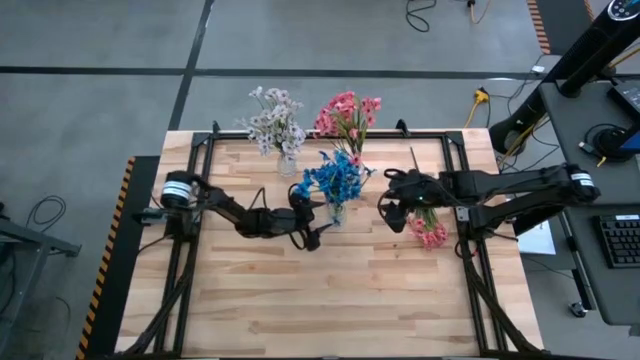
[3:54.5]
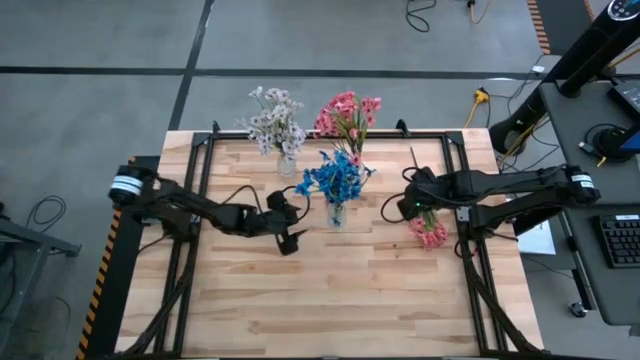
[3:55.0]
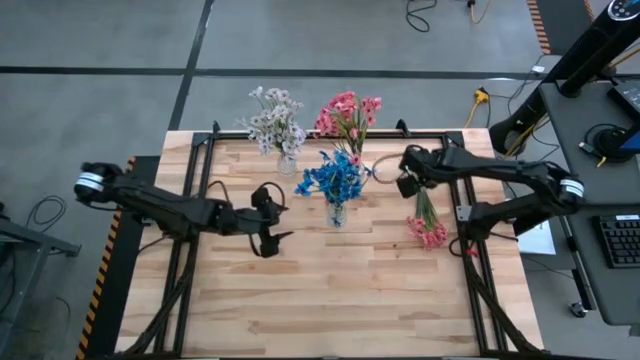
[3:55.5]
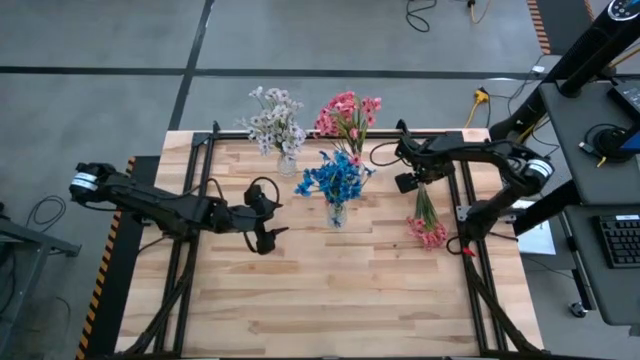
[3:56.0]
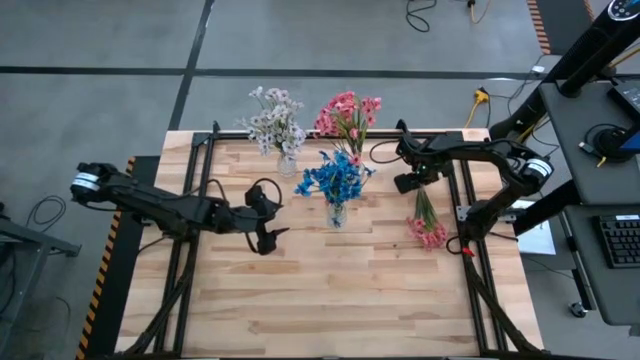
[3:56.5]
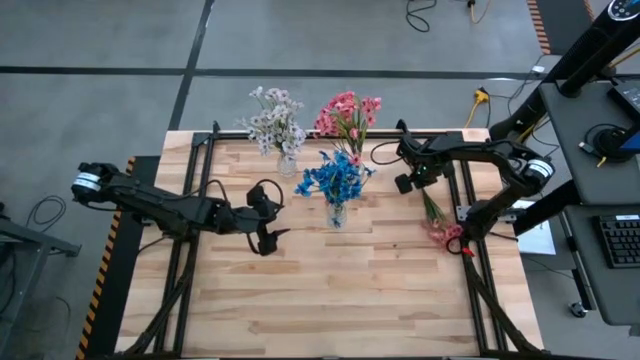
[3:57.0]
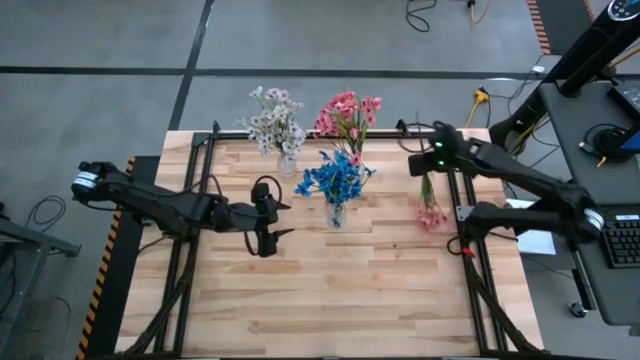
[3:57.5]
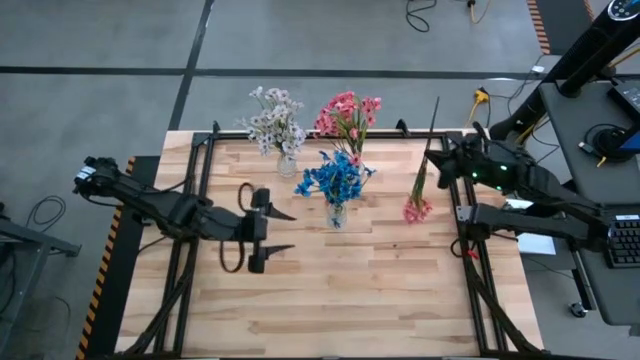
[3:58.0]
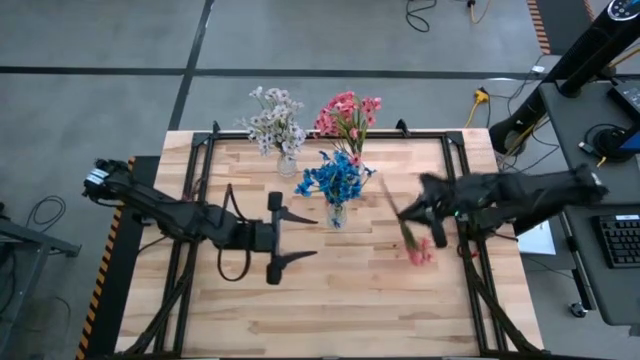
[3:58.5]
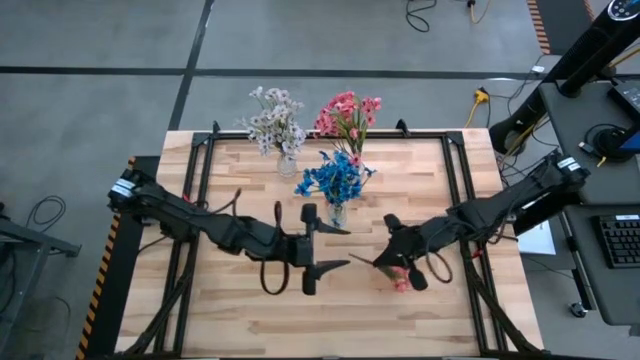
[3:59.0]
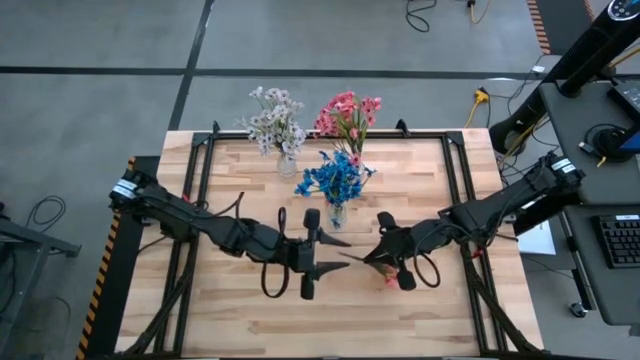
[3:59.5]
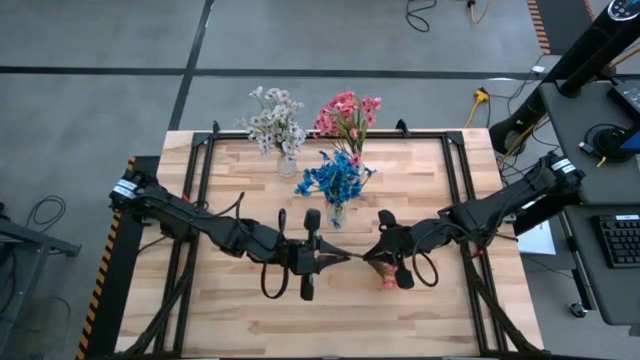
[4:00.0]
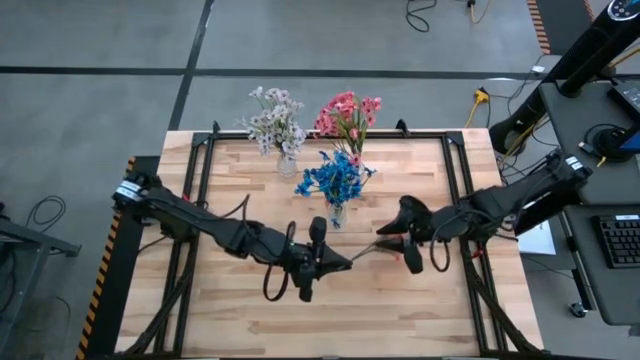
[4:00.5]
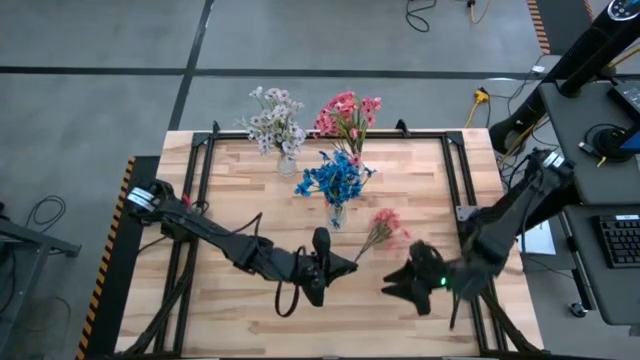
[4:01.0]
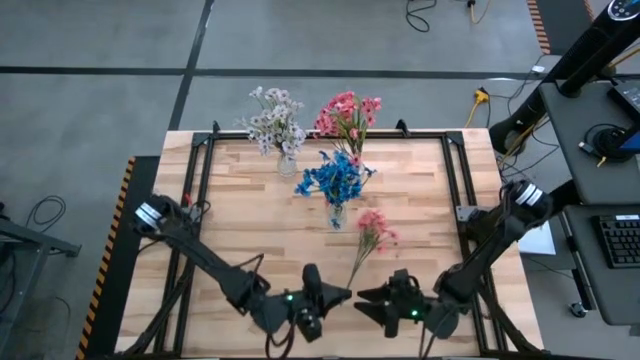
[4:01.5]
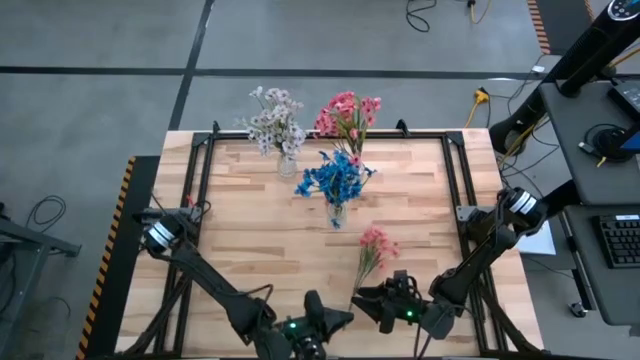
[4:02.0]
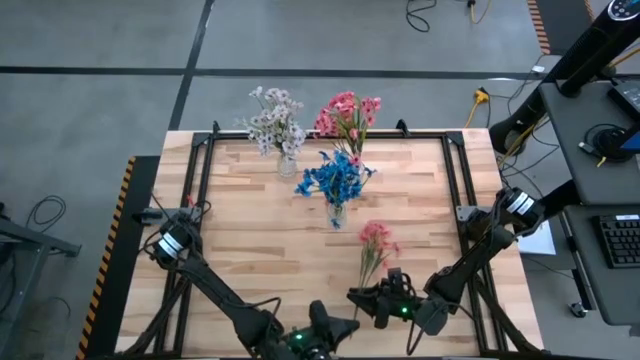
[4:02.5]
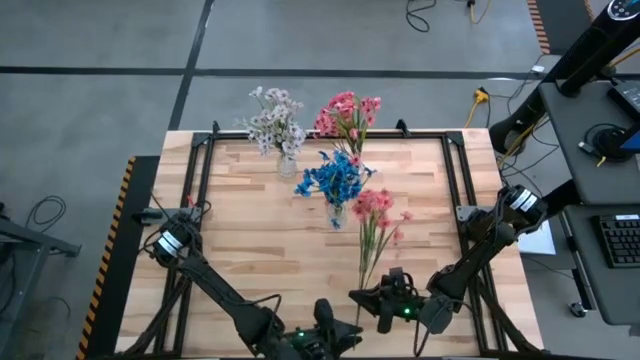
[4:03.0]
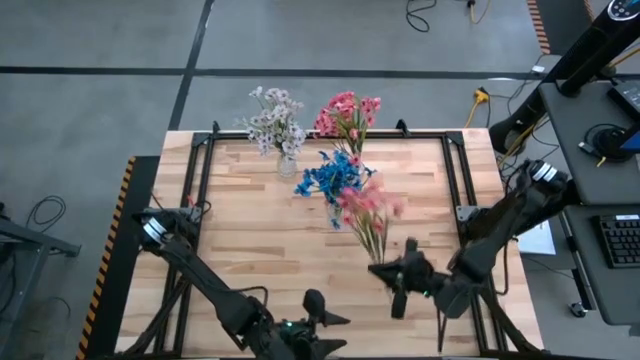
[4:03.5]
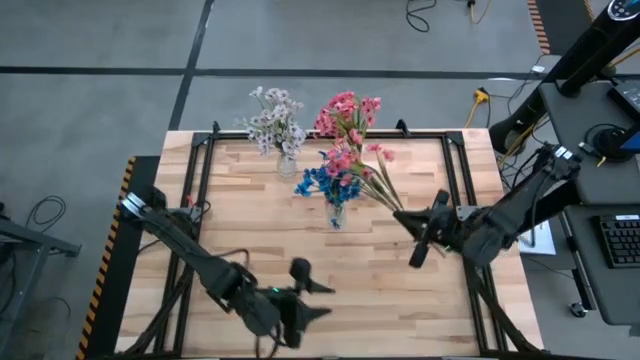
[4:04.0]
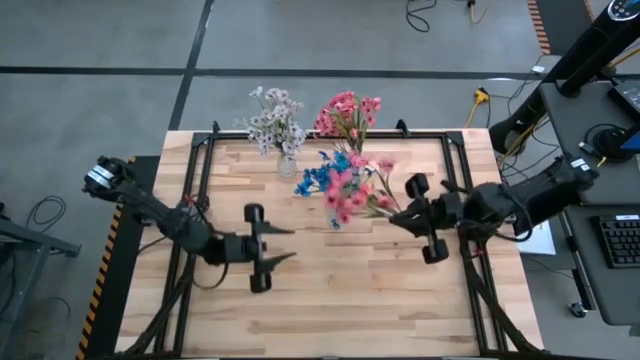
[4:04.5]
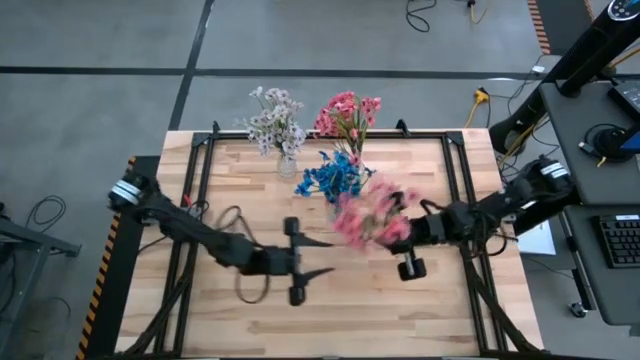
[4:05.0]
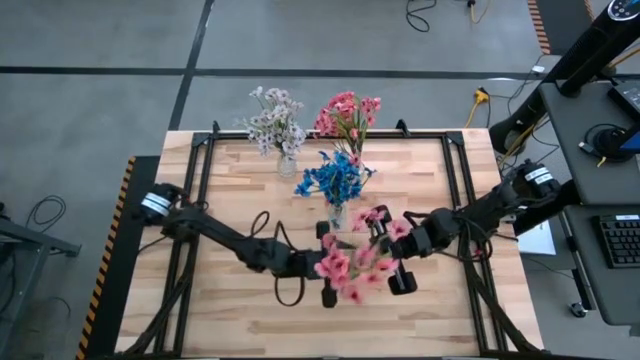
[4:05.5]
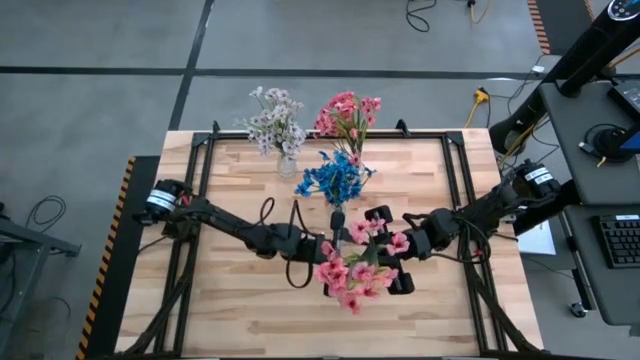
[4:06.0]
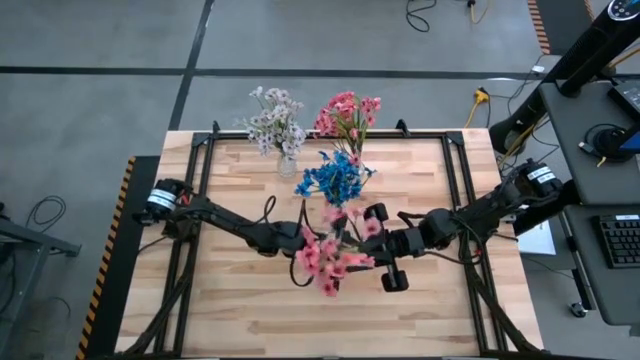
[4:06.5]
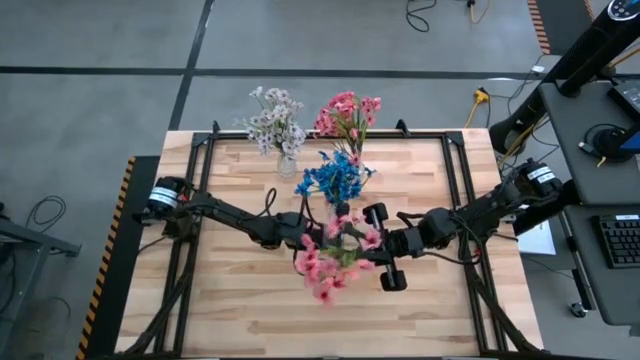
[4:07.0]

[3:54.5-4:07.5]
Task: Sort flowers into vase by color
Put the pink flowers into the right transparent vase

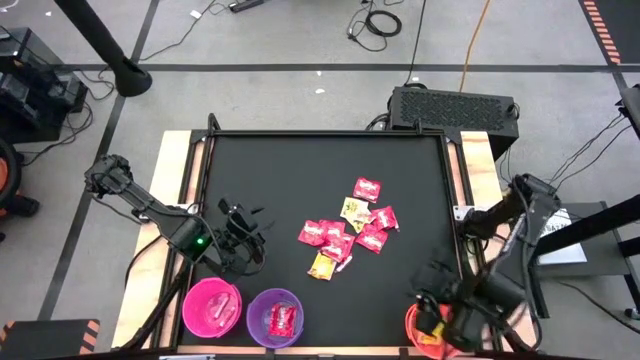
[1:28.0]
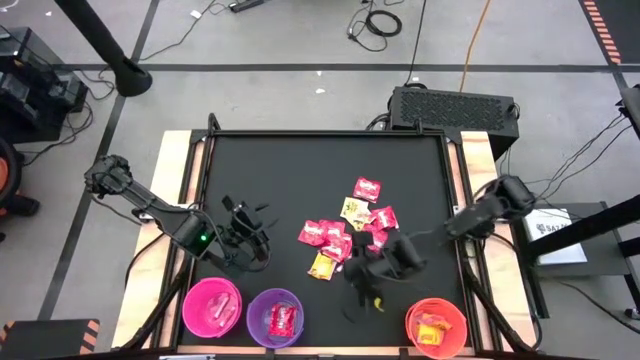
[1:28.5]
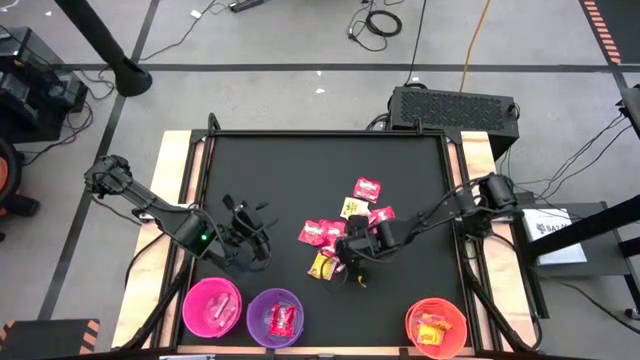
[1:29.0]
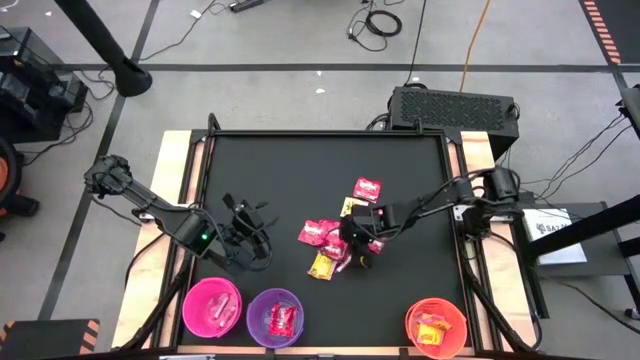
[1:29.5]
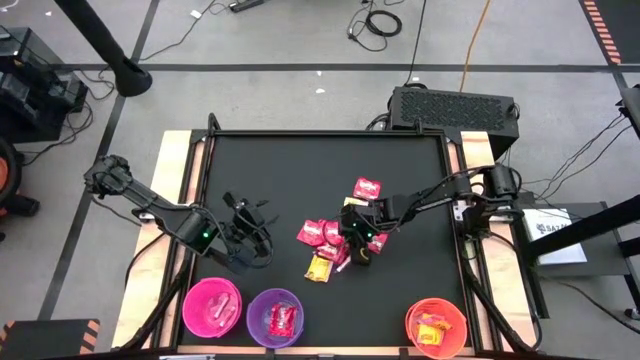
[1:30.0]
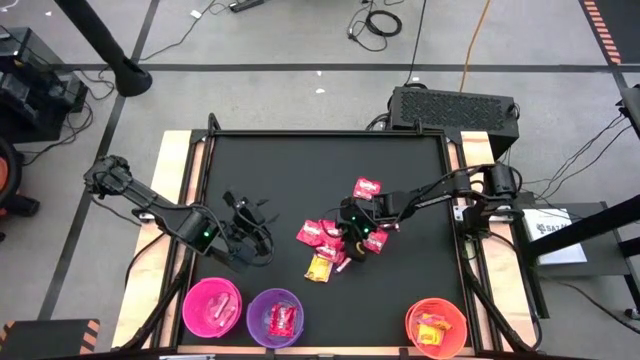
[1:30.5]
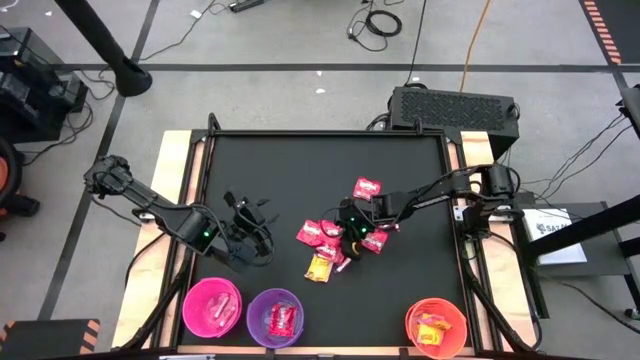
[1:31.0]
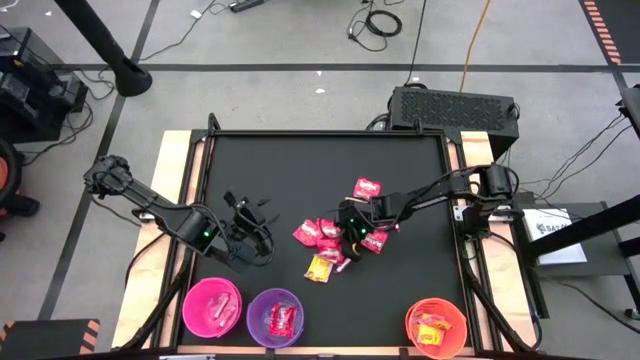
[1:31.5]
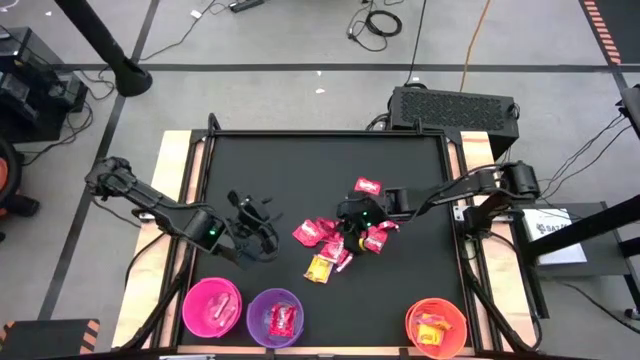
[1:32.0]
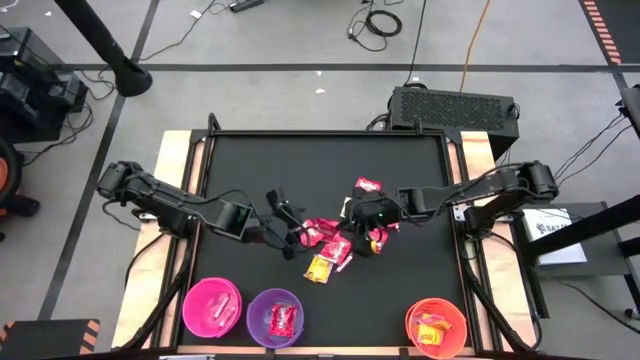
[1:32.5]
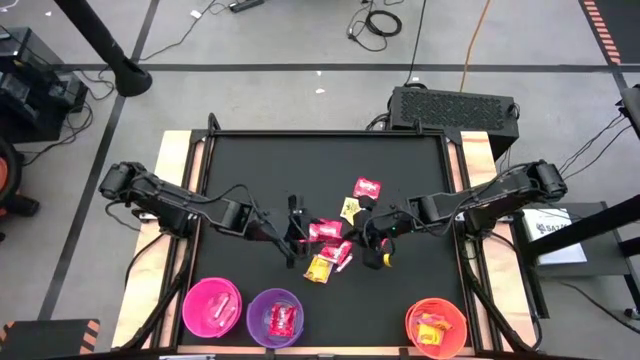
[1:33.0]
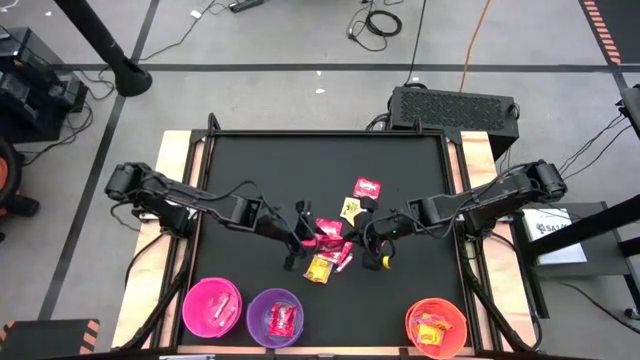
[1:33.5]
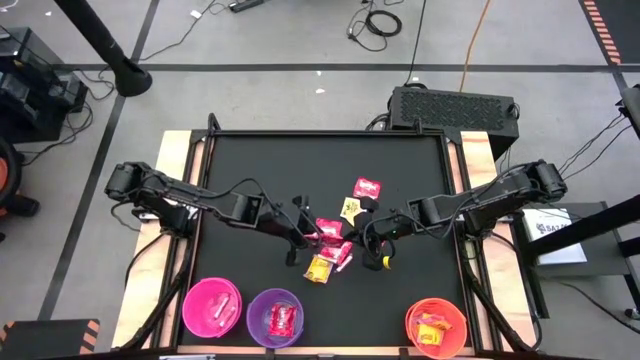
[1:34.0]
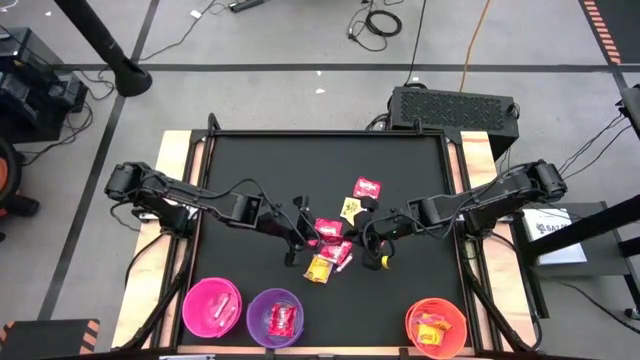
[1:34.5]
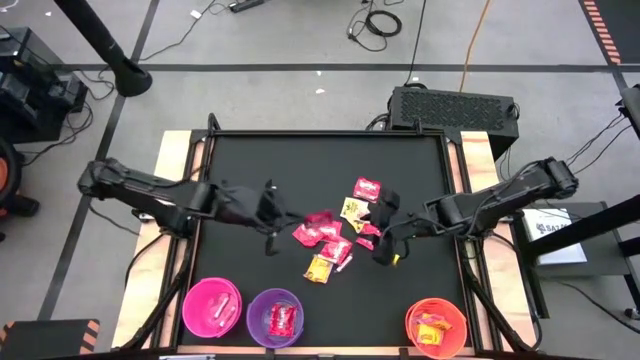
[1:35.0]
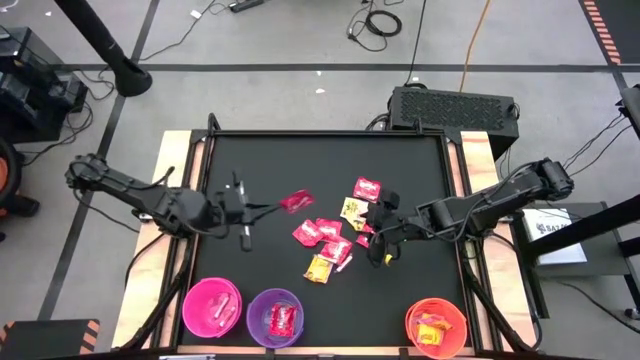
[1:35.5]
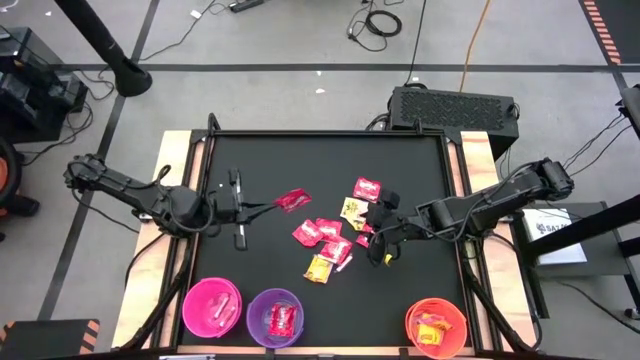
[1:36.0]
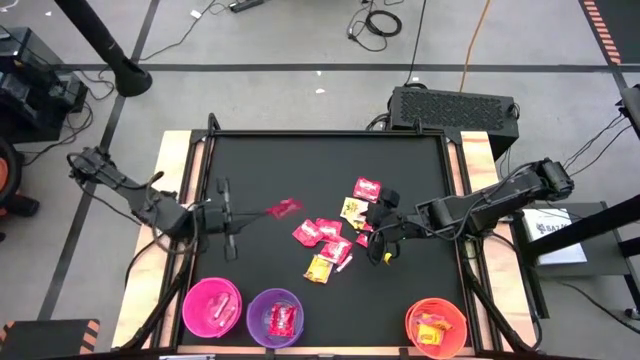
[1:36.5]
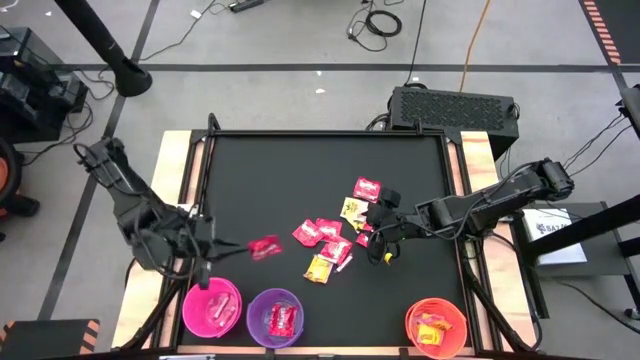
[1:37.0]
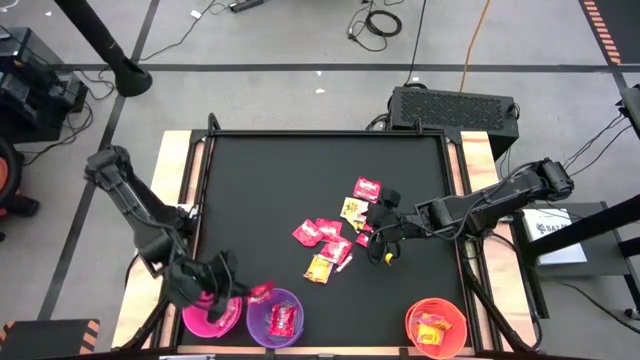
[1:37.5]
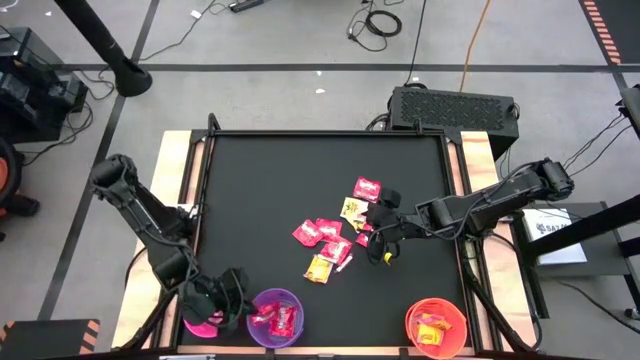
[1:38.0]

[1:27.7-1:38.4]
Task: Sort candy by brand, put in halloween buckets
Put the red candy into the violet bucket
